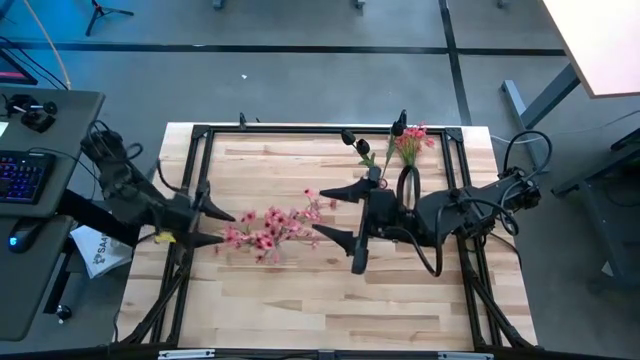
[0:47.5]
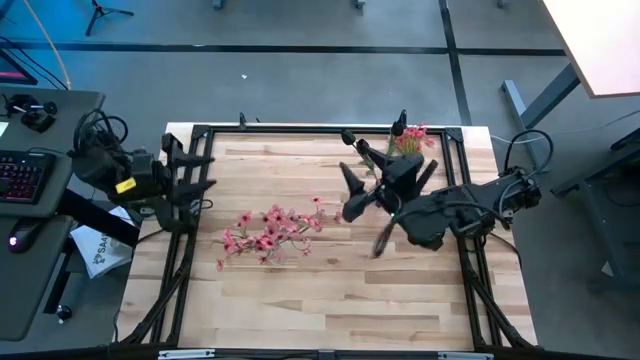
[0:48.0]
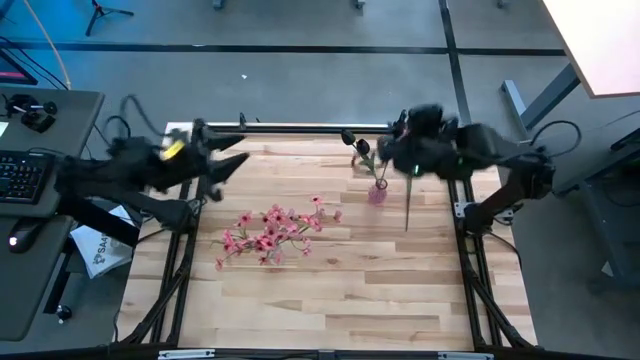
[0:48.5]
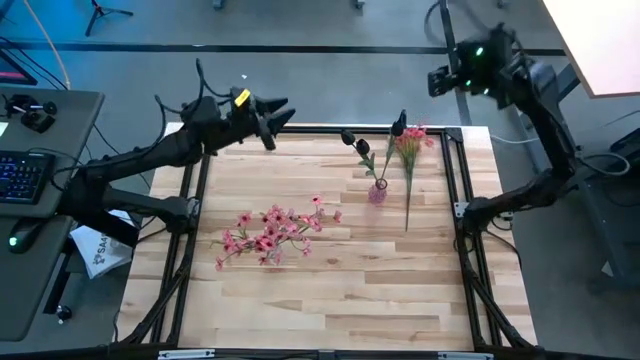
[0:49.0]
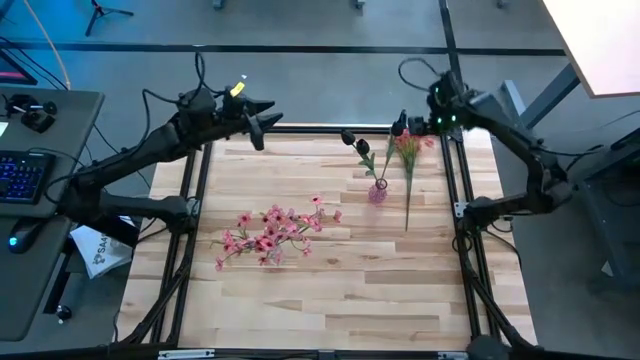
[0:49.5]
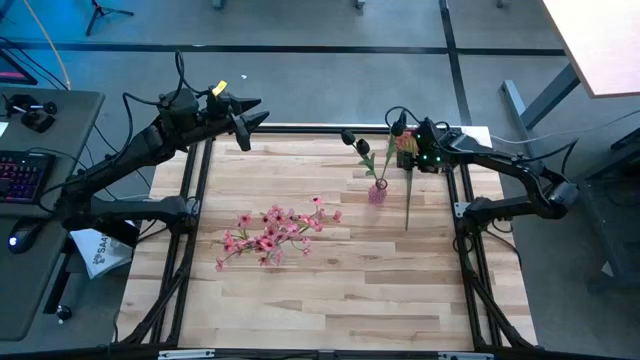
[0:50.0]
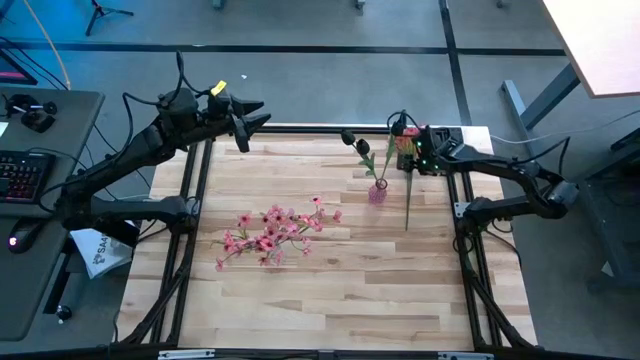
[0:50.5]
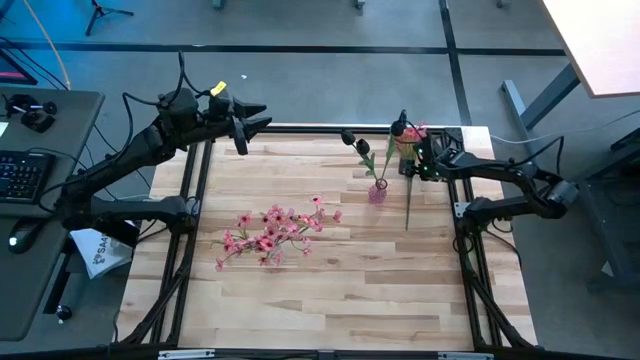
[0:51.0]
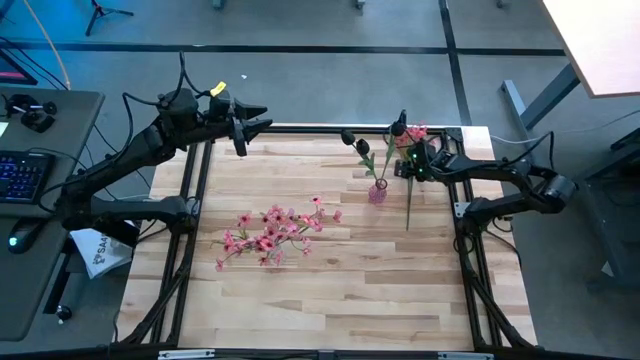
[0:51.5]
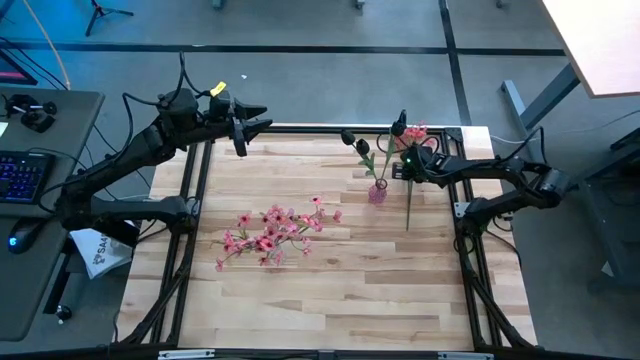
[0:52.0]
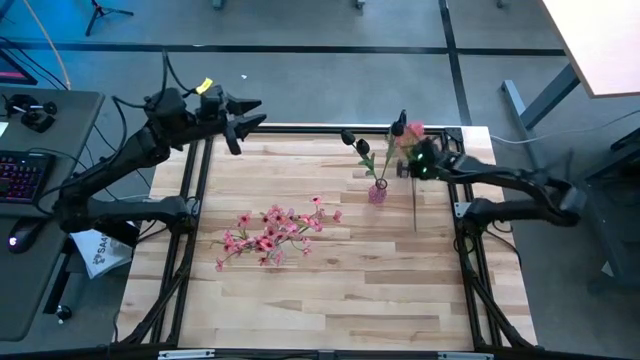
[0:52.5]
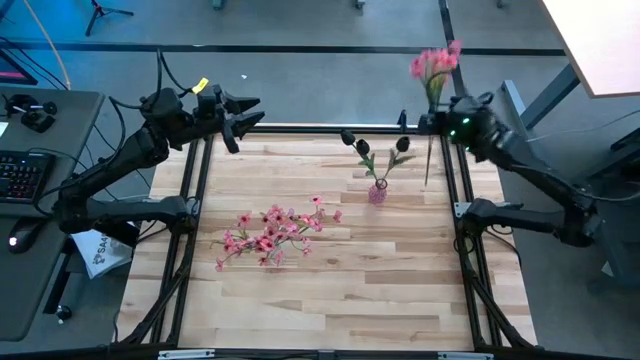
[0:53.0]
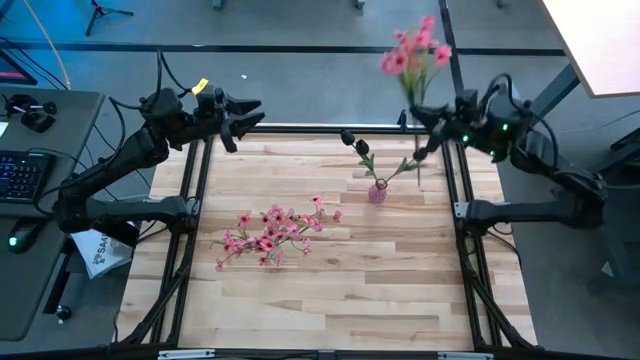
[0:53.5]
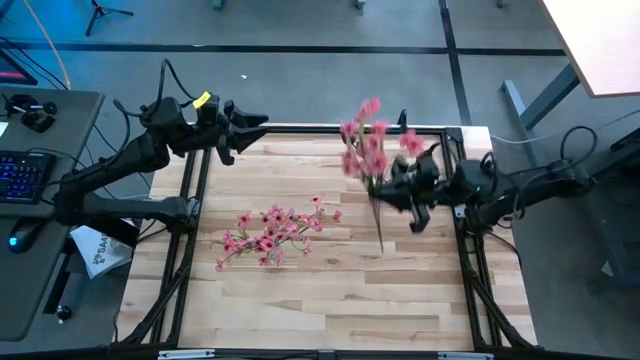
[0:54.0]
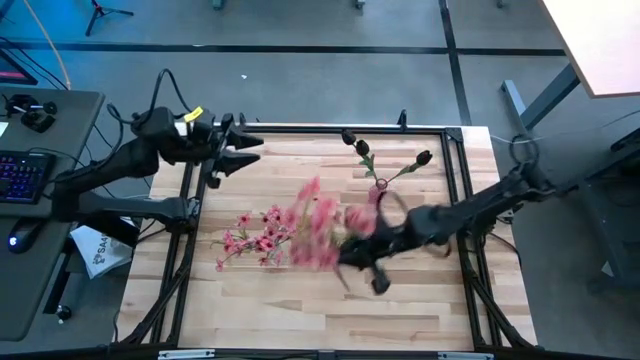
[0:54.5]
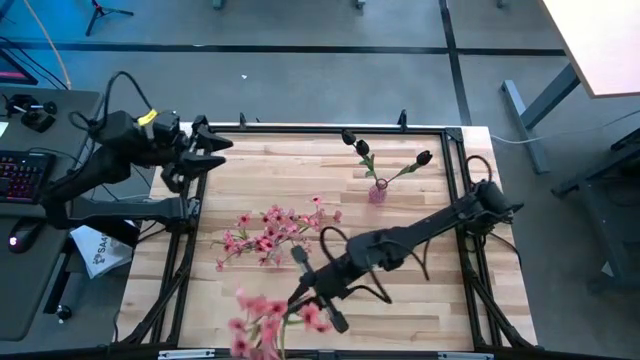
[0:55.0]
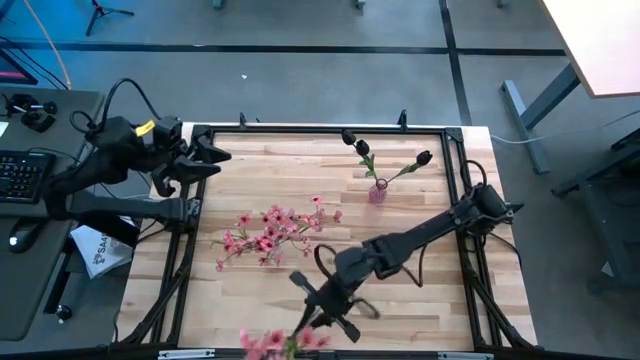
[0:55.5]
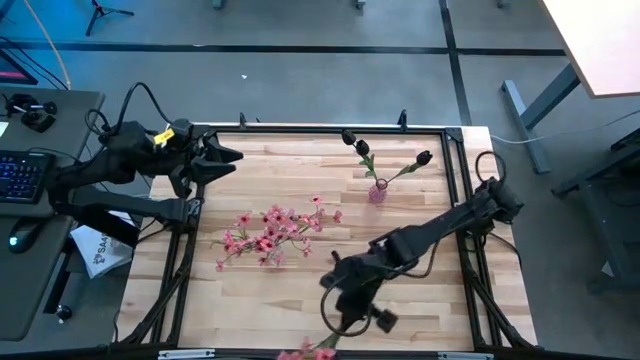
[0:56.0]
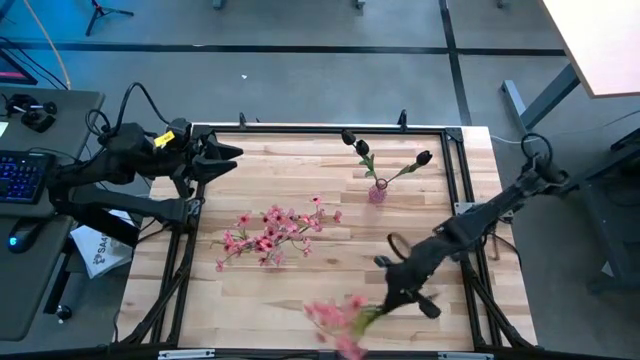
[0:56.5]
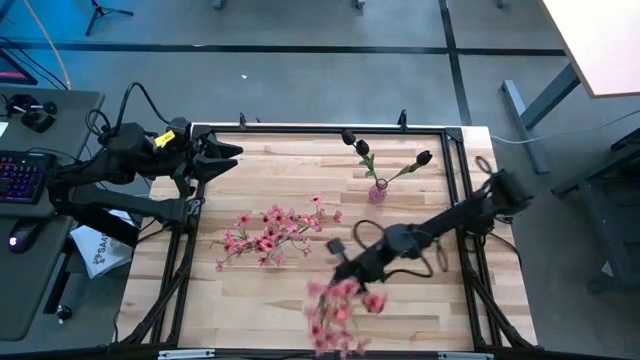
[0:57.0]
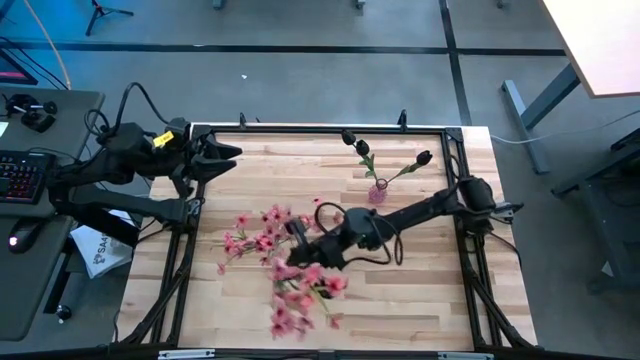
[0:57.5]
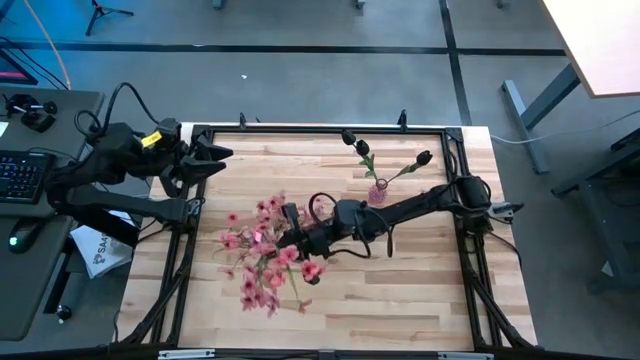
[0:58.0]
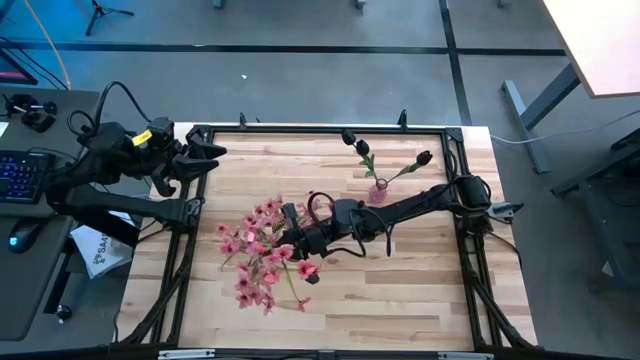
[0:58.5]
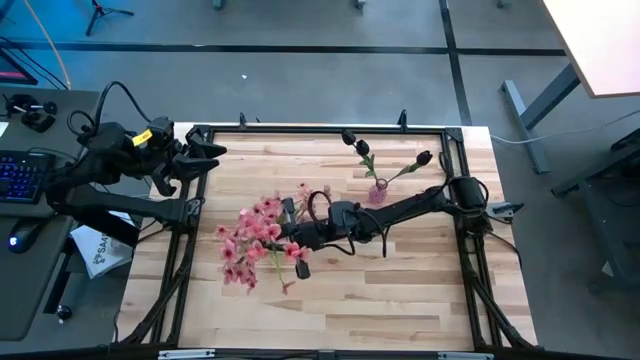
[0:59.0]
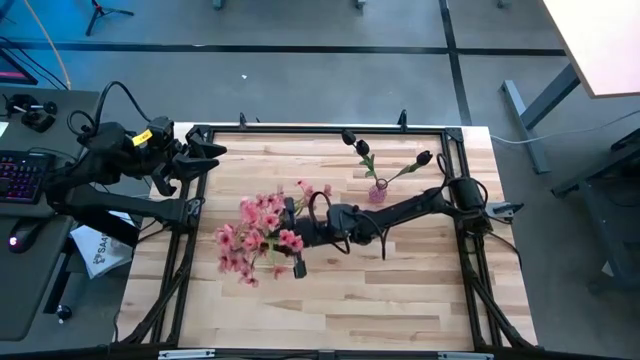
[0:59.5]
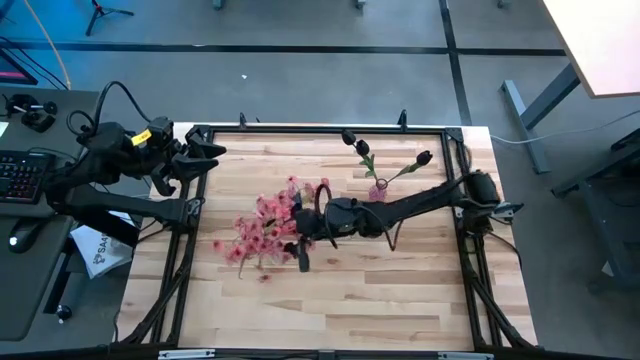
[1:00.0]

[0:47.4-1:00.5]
Task: Sort flowers into vase by color
Put the pink flowers into the transparent vase

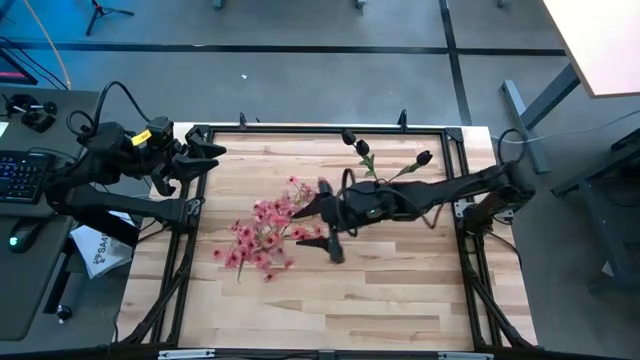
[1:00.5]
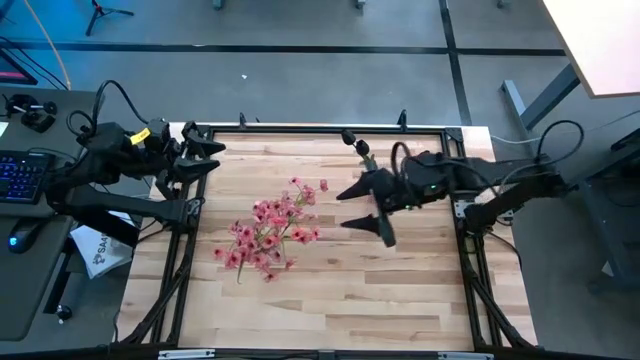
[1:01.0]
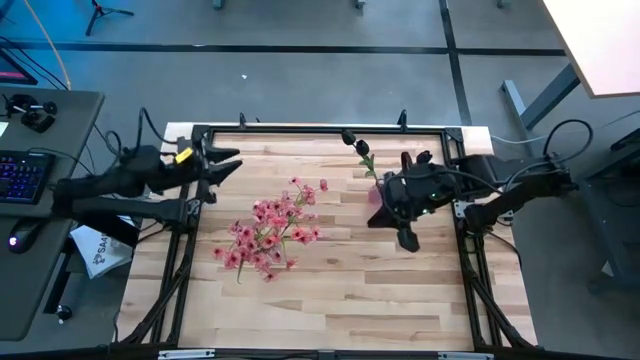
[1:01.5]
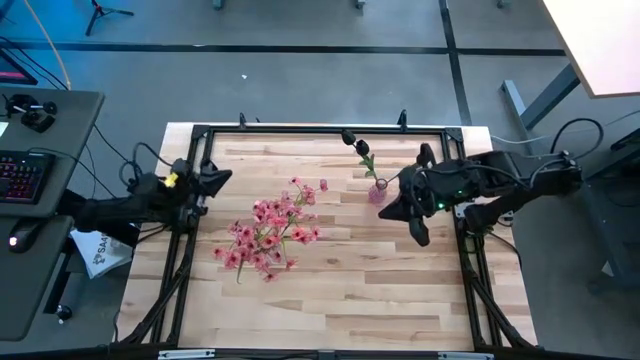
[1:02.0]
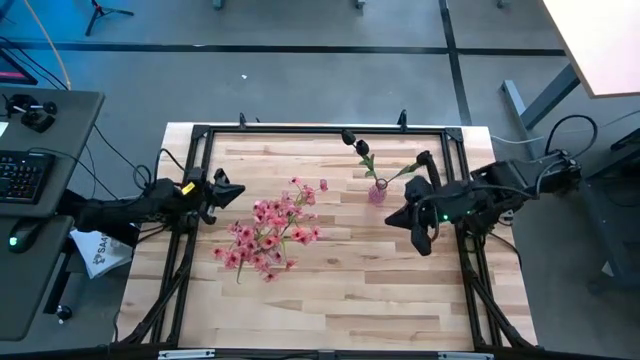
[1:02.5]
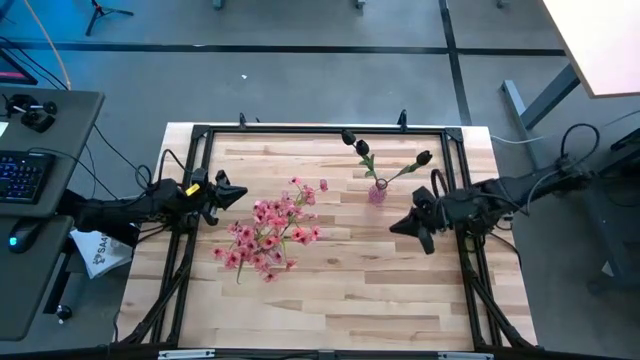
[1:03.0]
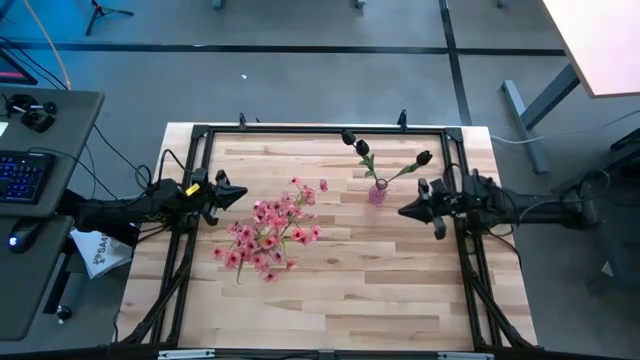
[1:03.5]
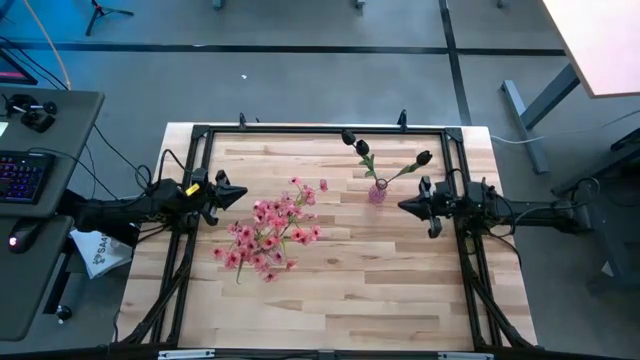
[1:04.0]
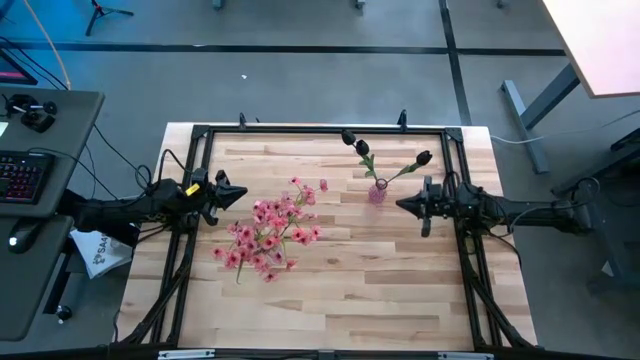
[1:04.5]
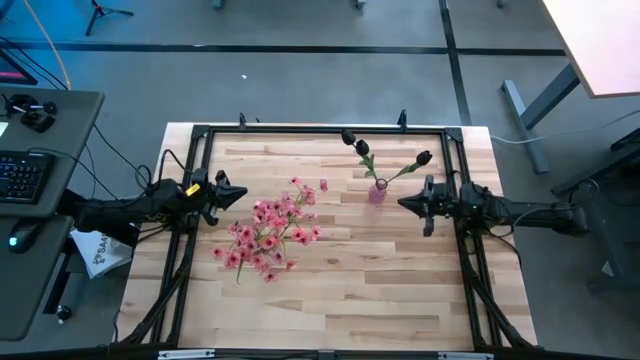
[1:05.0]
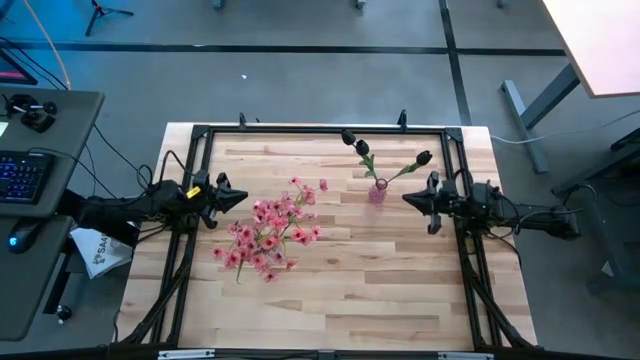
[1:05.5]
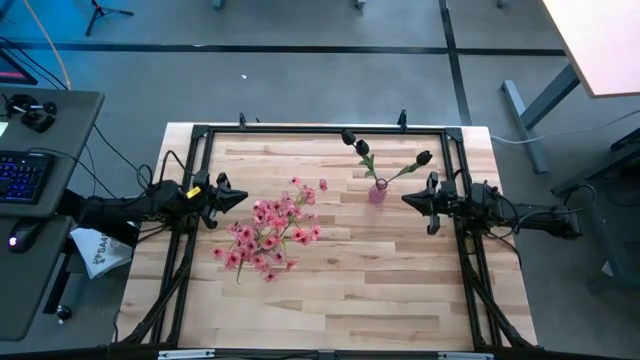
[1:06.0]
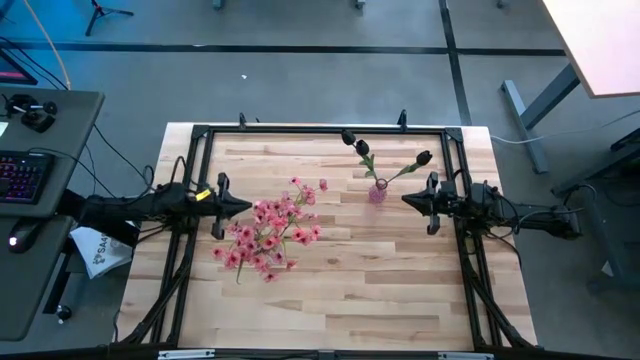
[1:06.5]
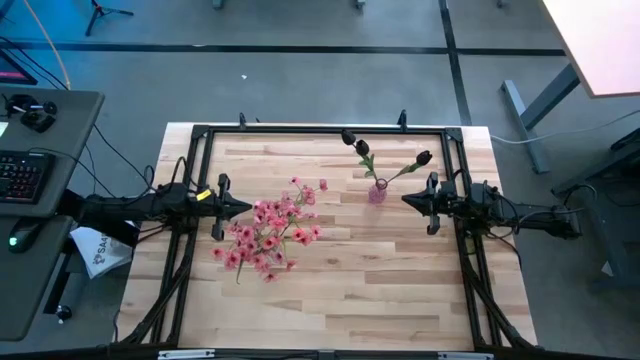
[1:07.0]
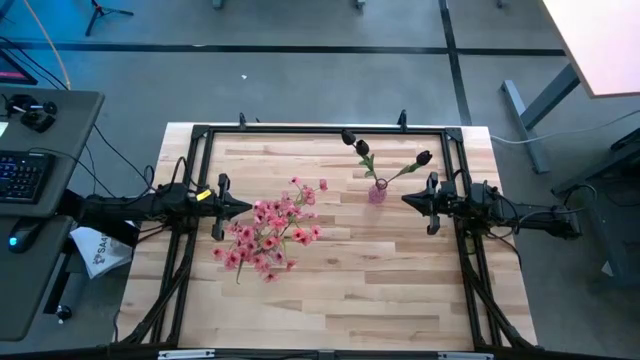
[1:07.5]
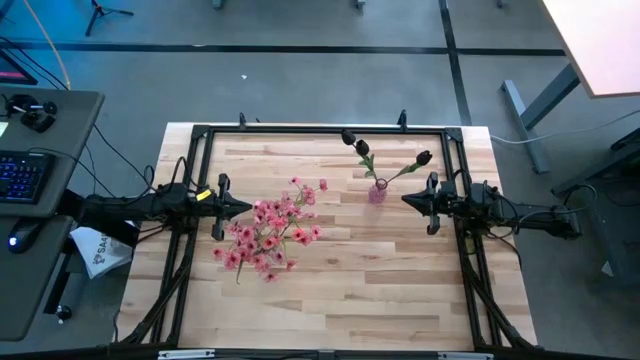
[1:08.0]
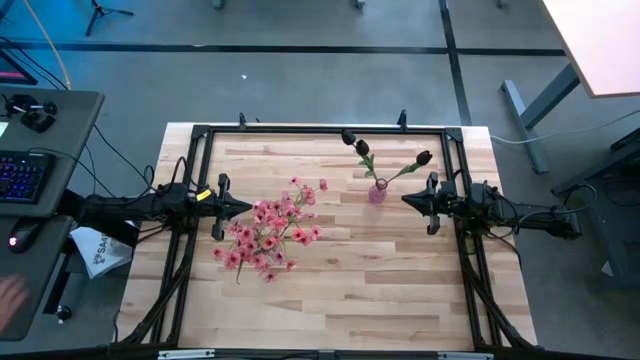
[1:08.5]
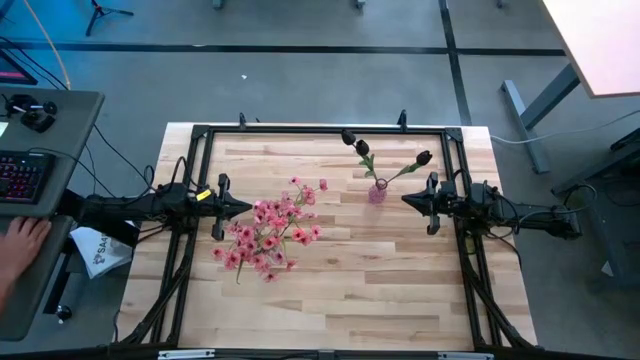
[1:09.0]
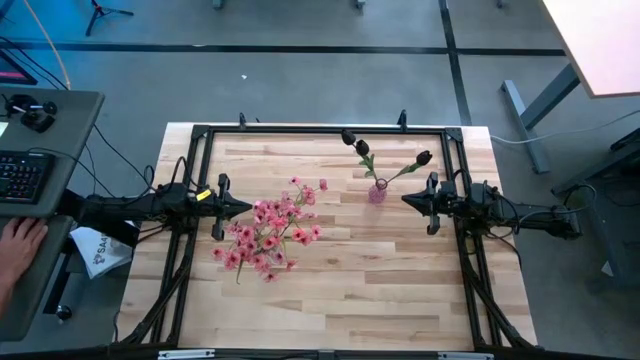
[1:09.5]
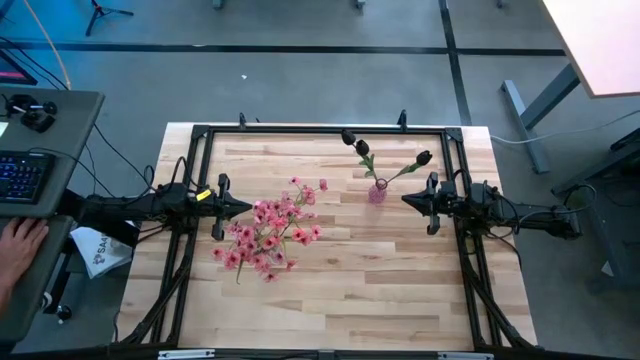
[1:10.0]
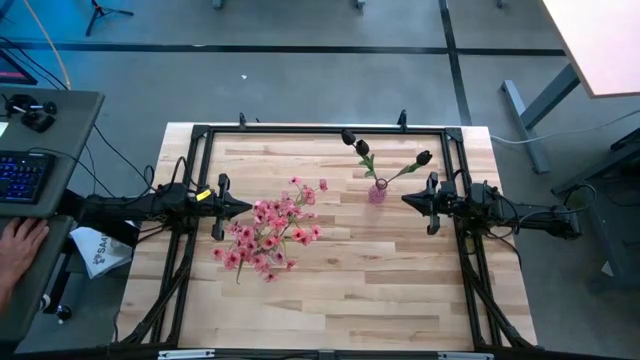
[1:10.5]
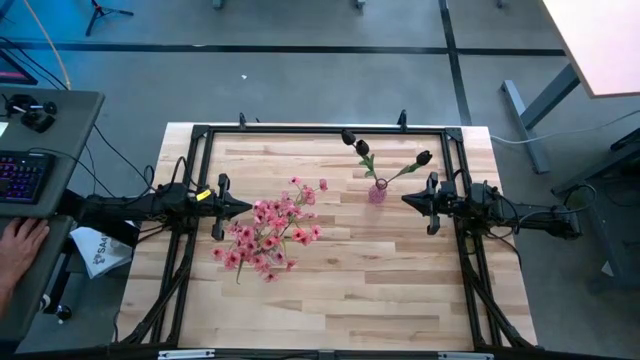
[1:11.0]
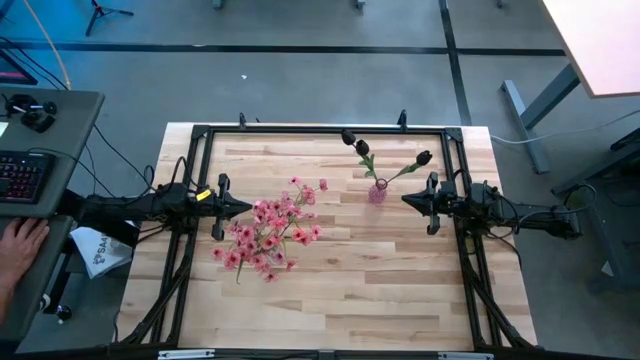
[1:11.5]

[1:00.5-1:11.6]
Return to Home Position
